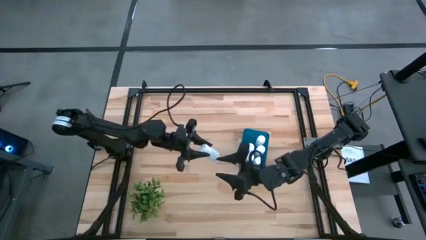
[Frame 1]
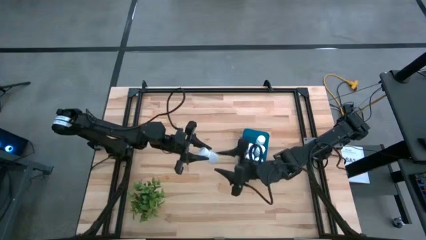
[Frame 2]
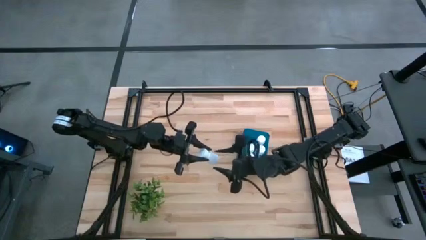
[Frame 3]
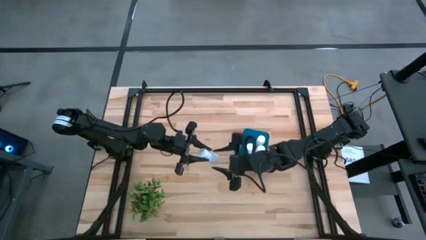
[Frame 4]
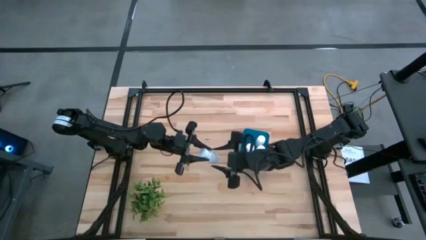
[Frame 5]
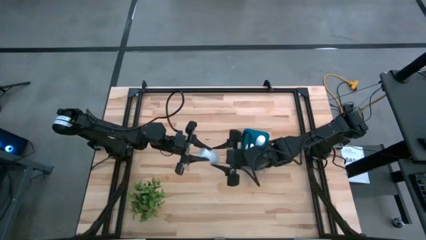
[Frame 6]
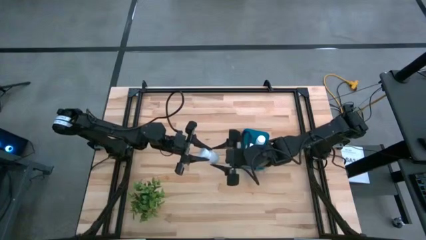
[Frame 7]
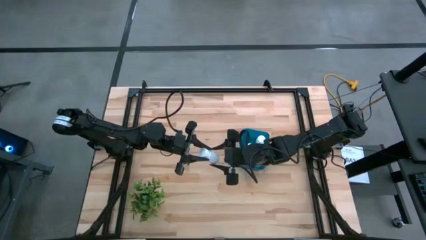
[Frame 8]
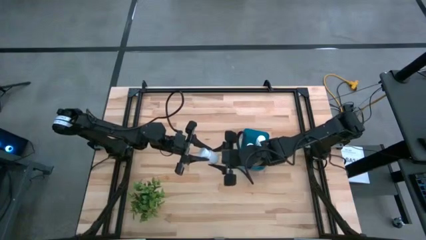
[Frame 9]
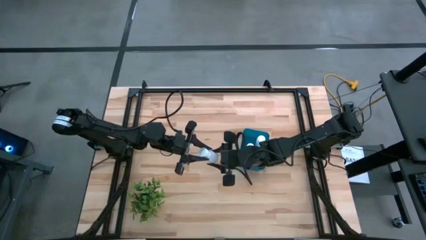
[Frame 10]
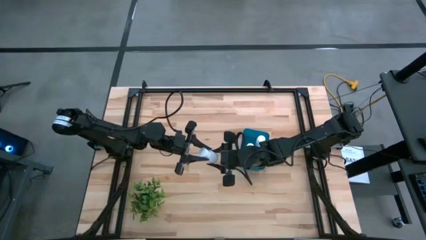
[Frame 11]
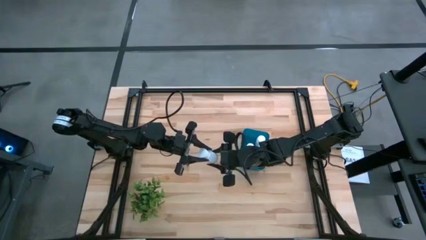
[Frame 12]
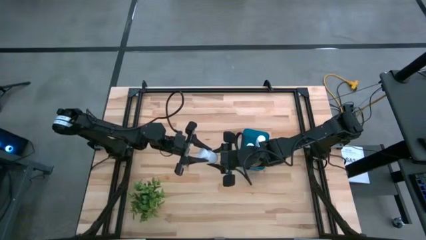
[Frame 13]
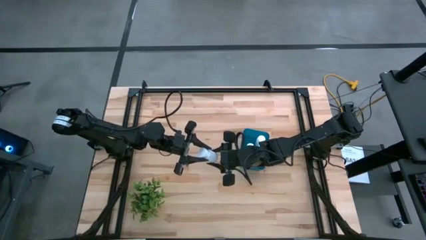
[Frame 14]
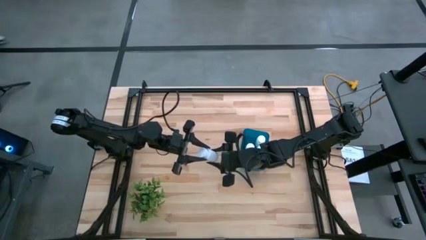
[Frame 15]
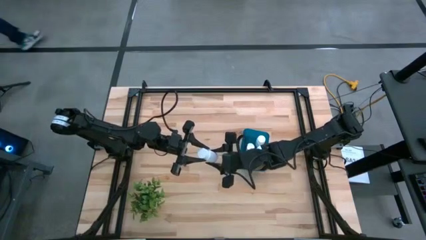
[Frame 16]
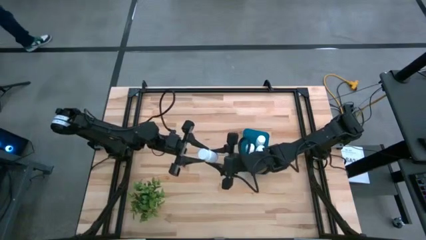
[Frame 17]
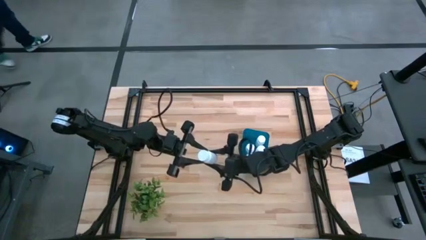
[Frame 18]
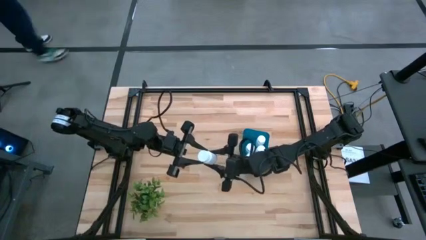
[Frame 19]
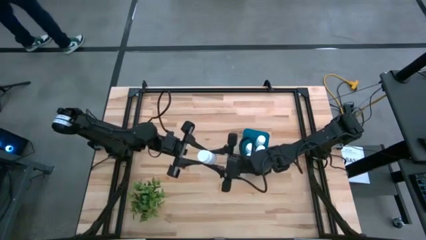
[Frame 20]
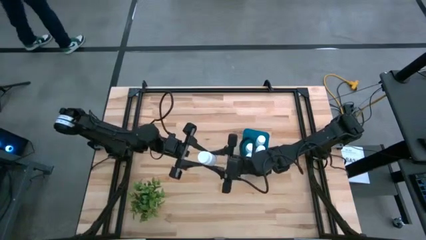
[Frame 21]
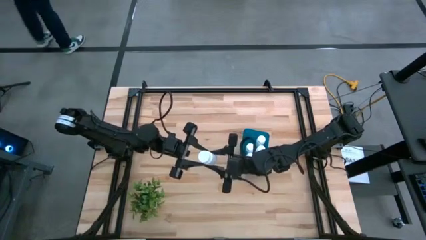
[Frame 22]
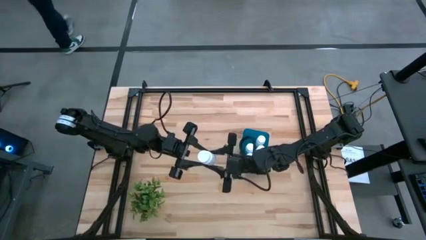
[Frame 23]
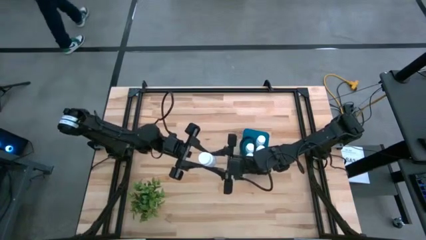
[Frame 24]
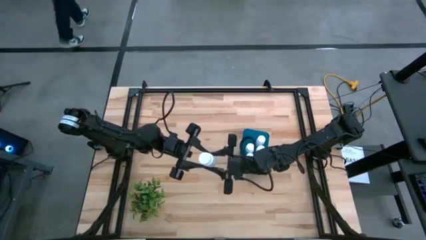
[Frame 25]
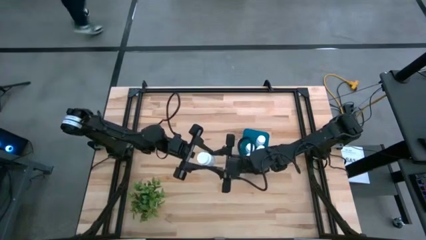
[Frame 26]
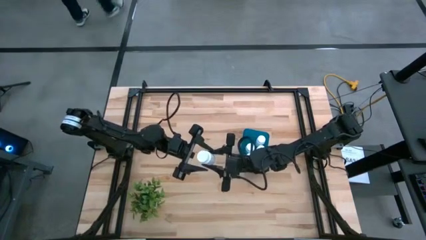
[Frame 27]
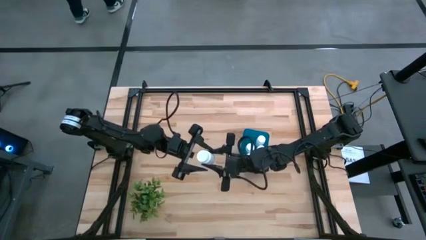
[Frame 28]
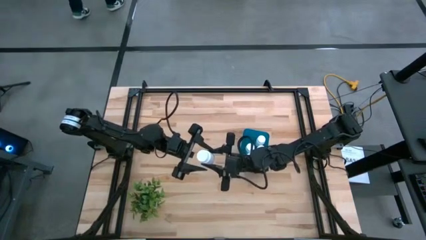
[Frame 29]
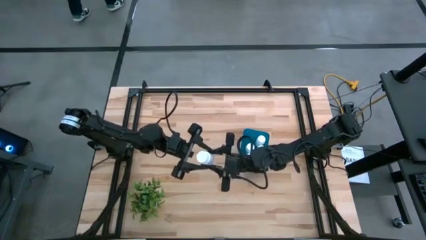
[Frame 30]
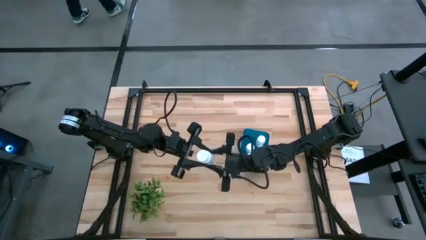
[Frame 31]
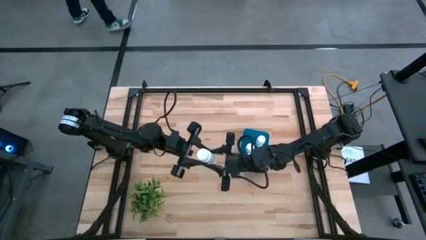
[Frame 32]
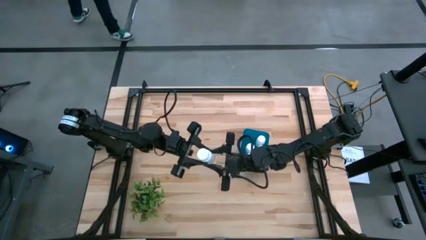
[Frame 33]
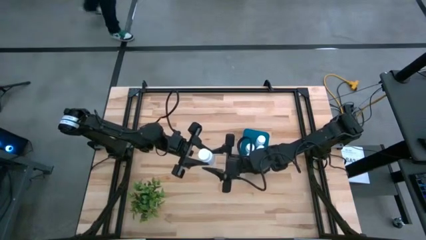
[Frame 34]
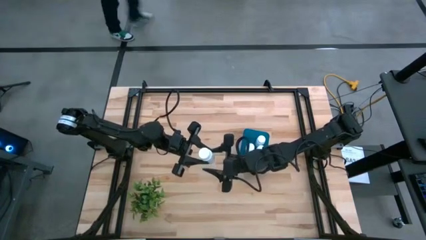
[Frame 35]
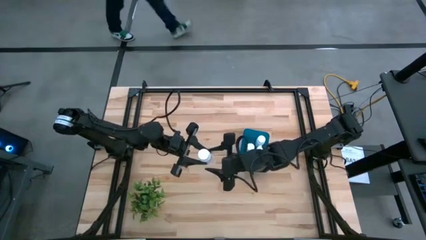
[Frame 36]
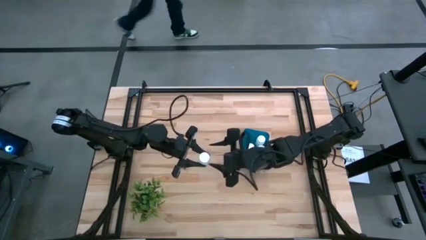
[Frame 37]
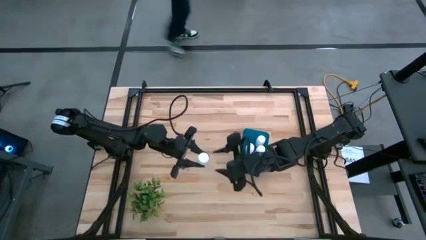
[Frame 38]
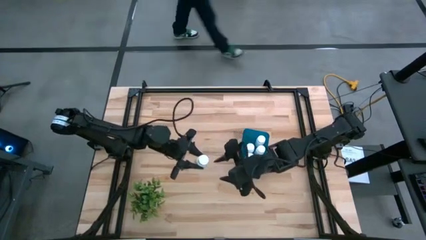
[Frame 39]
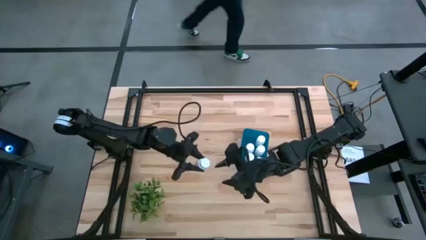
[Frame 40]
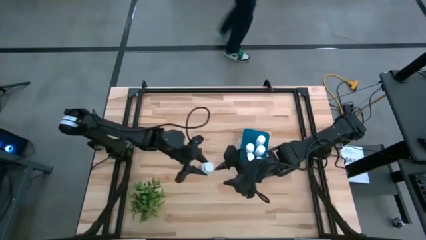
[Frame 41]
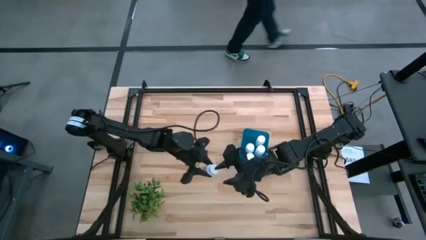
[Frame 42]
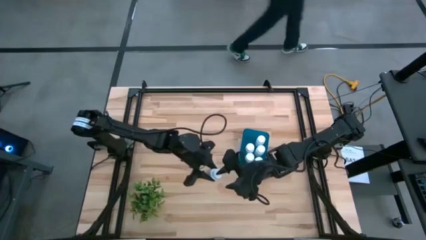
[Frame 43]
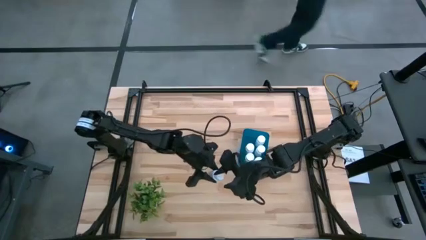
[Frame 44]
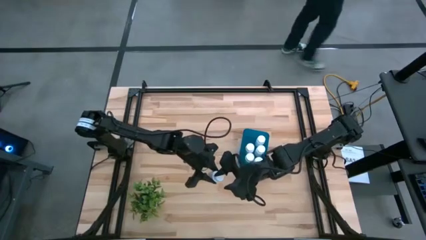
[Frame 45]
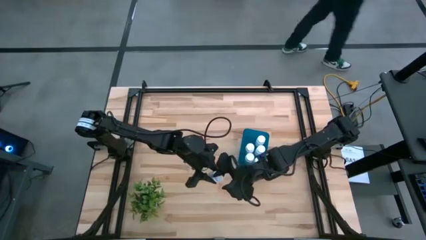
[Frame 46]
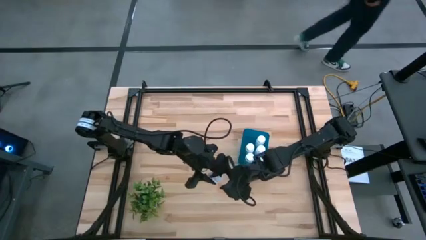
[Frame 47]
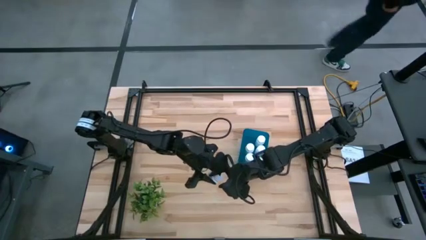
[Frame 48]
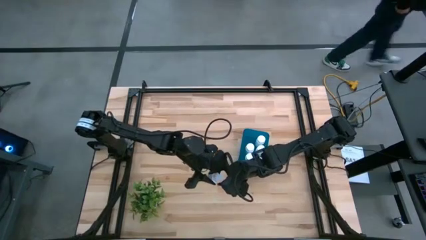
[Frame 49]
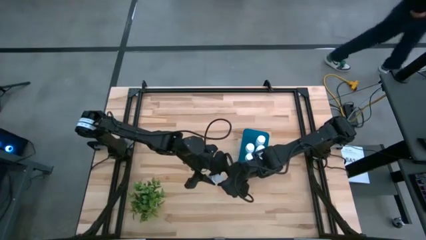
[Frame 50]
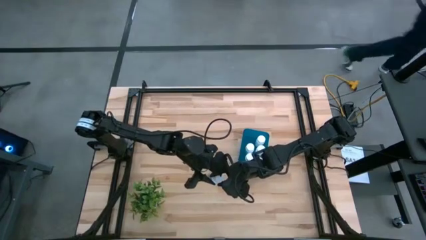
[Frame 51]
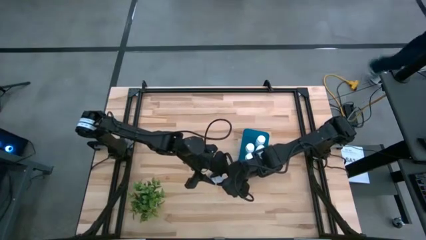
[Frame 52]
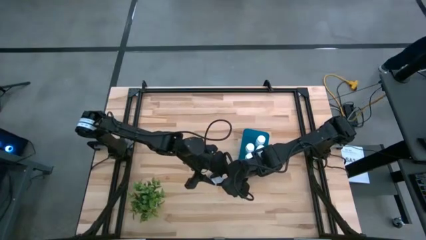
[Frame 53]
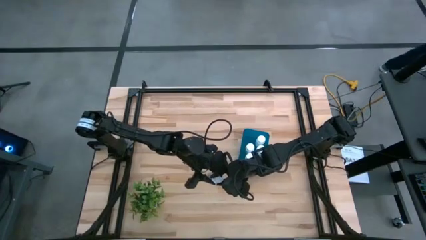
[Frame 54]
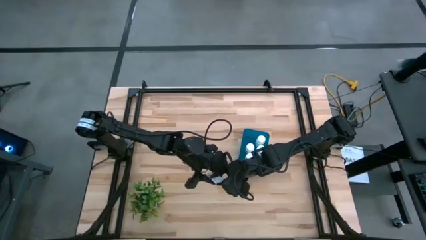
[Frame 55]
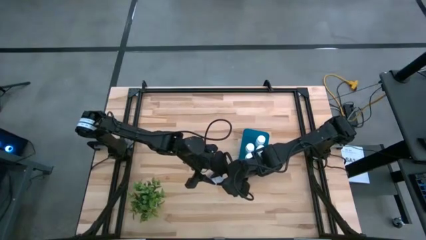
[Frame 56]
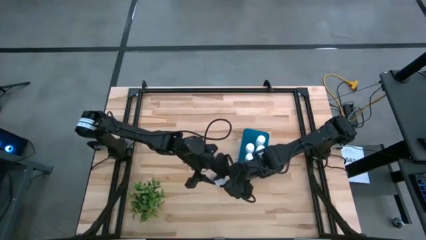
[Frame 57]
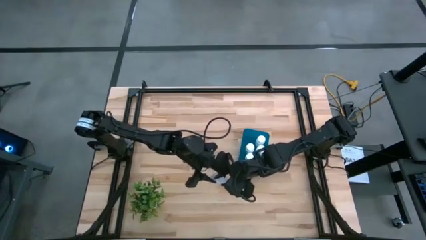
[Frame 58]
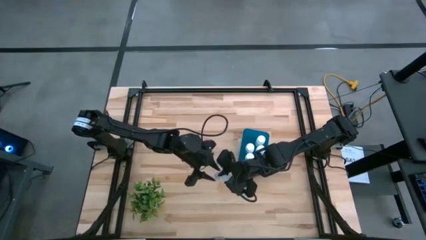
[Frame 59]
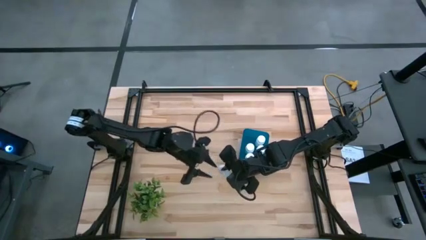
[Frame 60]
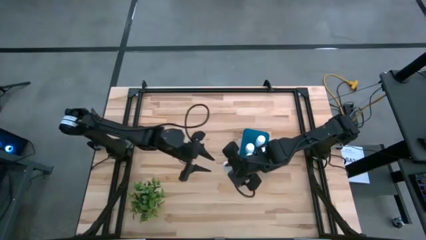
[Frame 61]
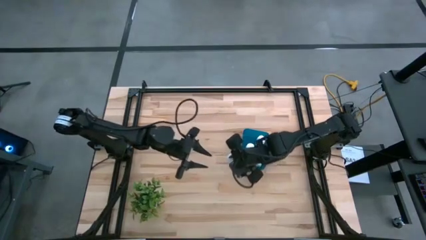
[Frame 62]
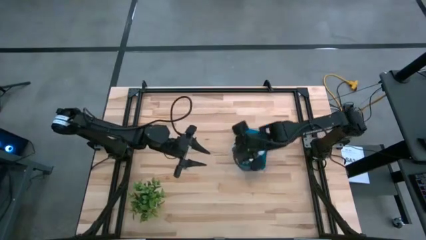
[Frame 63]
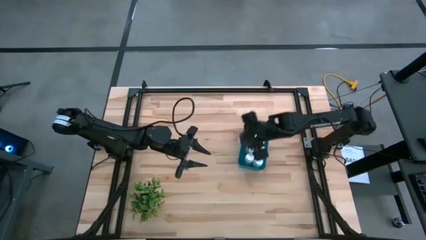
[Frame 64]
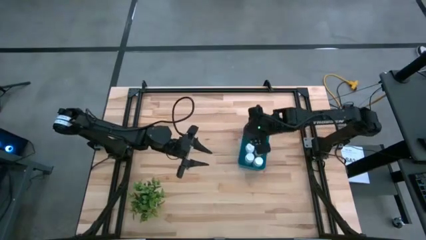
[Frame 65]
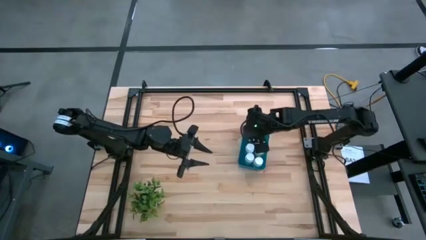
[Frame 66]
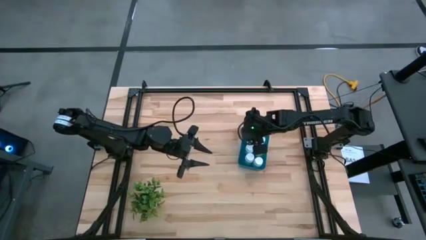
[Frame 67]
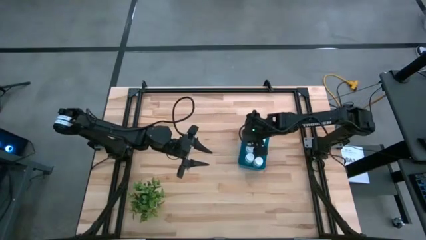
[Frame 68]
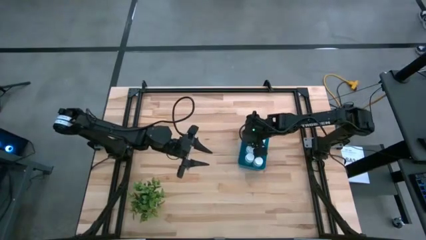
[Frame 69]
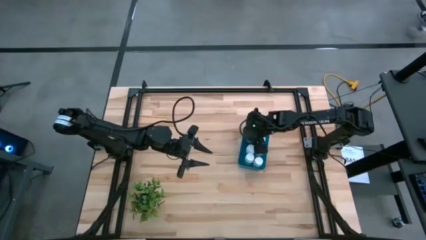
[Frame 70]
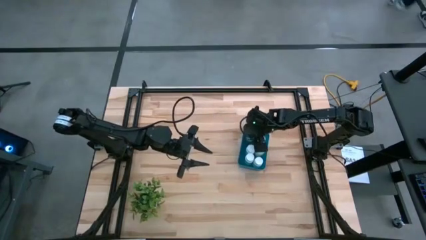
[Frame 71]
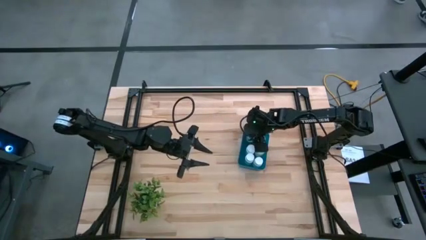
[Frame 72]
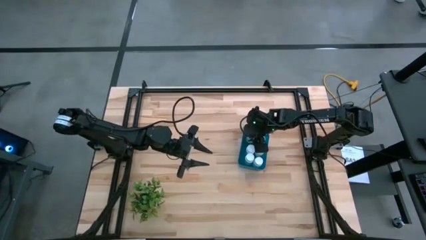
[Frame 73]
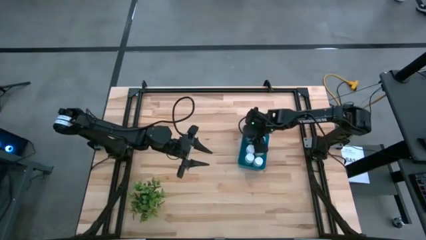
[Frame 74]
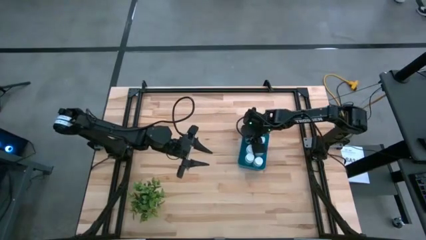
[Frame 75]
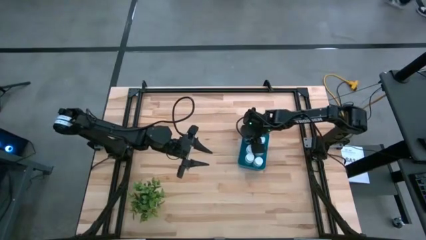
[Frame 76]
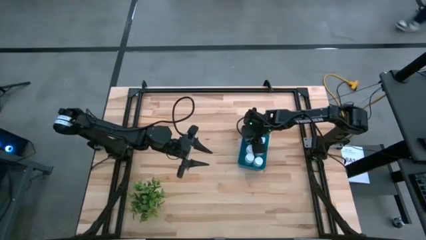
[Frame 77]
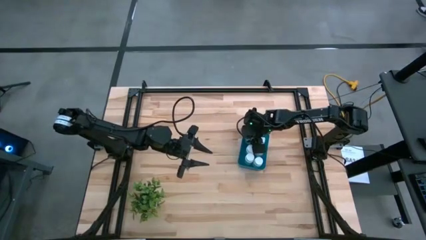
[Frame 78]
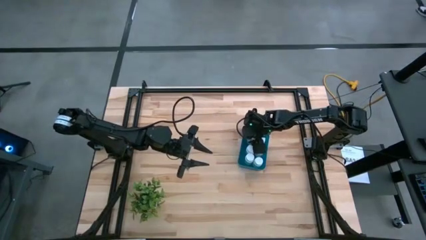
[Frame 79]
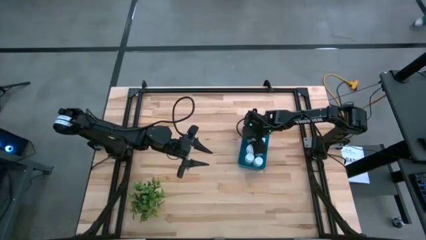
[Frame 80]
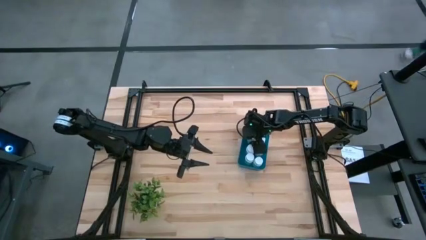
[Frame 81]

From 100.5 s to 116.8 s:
Task: Pick and place pill bottles into a basket
Put the white medicine bottle into the blue bin
